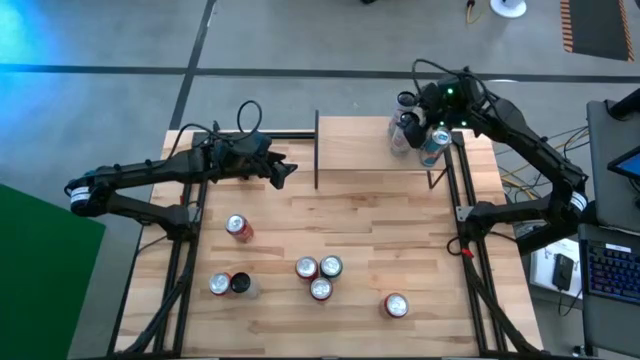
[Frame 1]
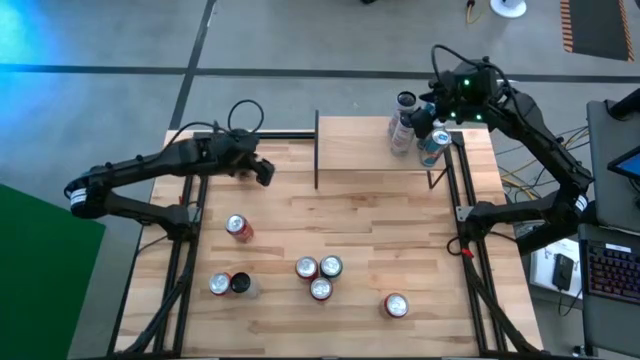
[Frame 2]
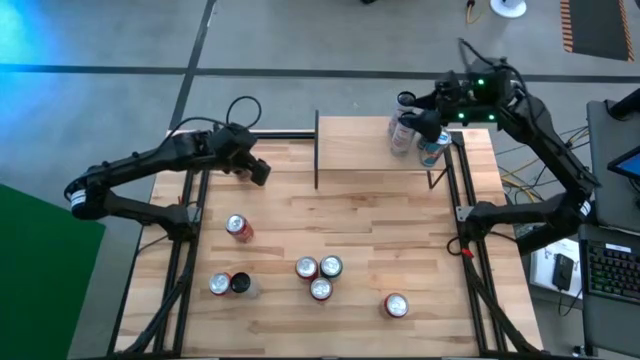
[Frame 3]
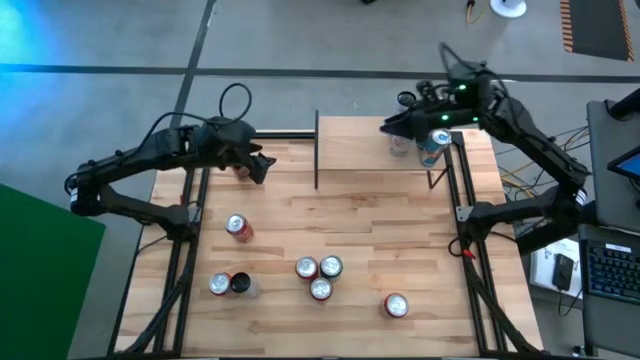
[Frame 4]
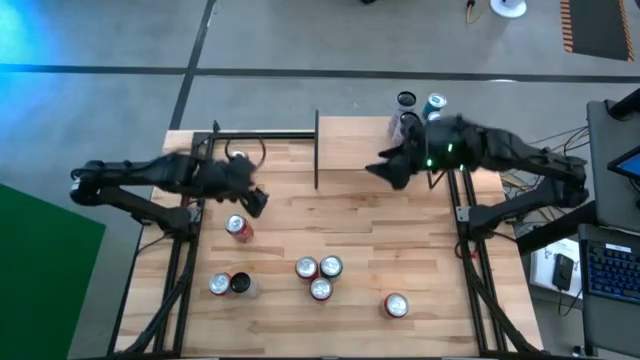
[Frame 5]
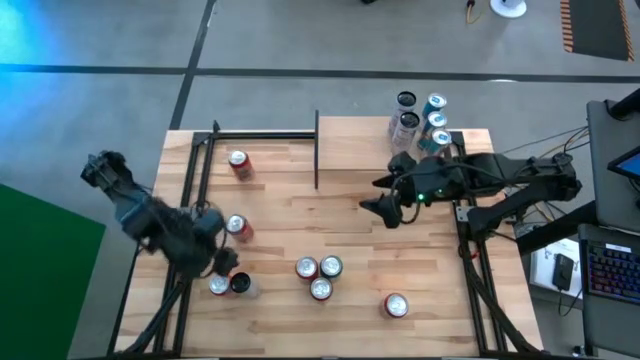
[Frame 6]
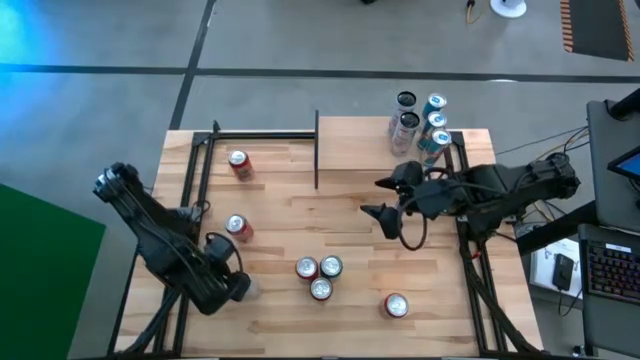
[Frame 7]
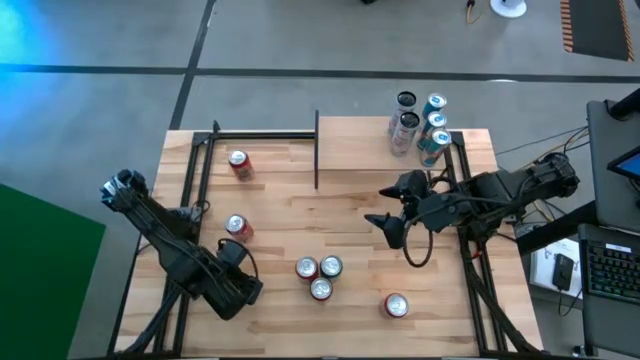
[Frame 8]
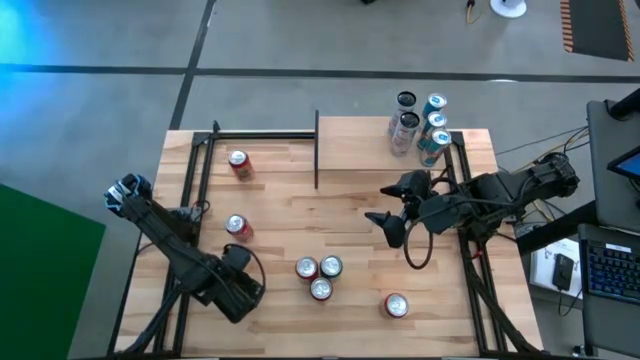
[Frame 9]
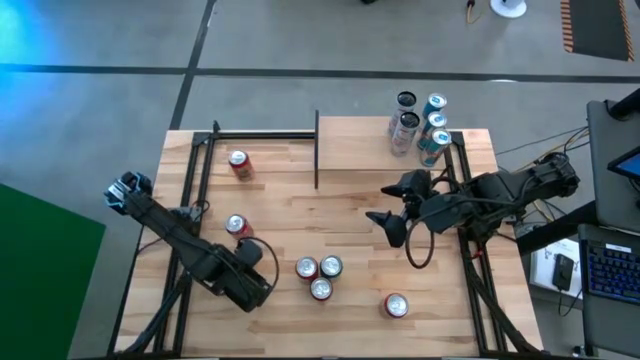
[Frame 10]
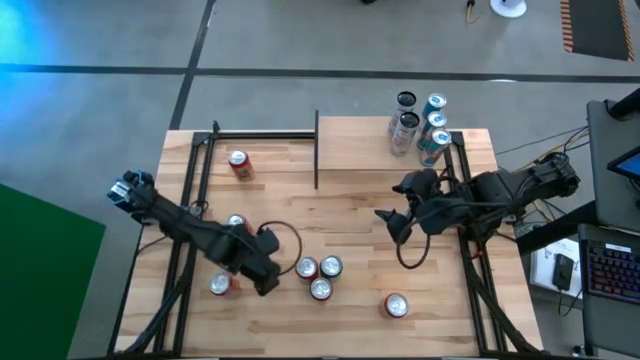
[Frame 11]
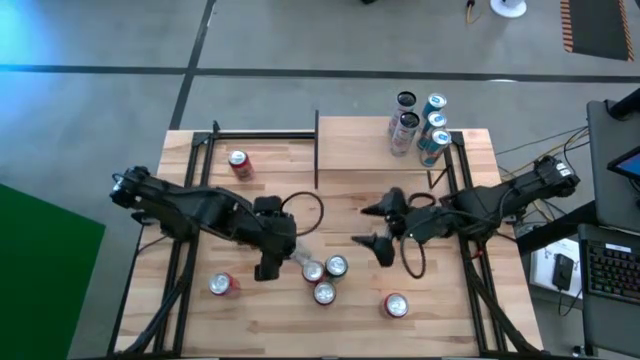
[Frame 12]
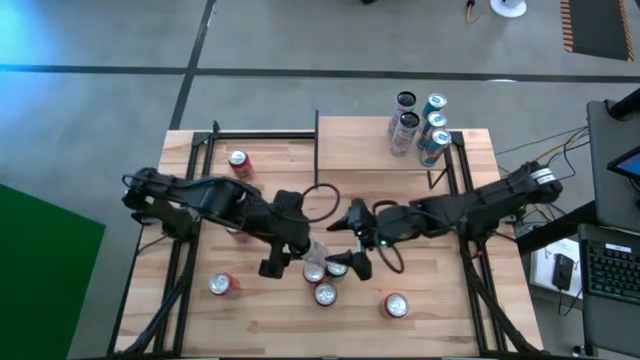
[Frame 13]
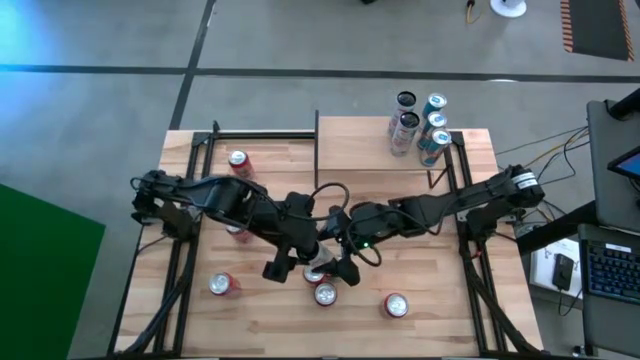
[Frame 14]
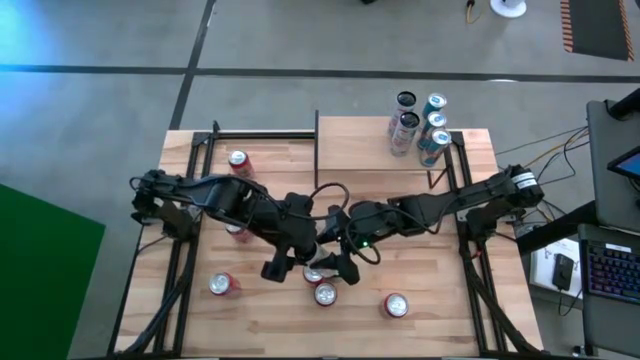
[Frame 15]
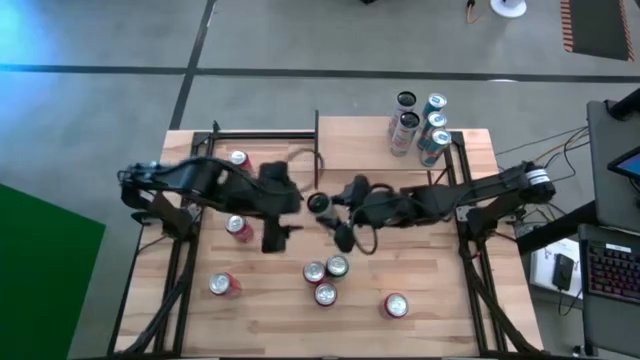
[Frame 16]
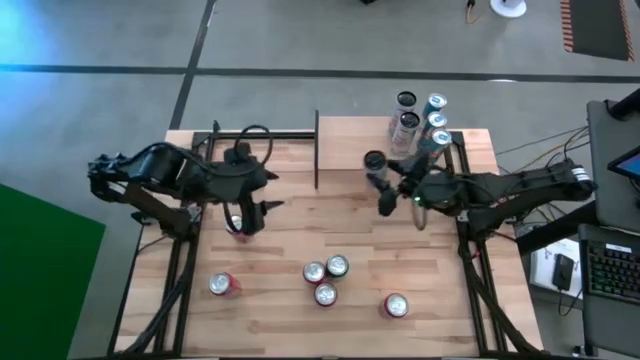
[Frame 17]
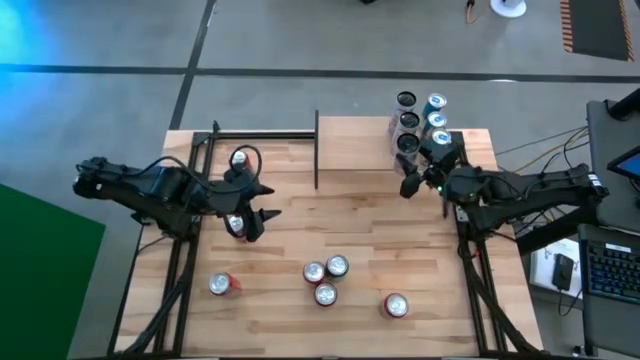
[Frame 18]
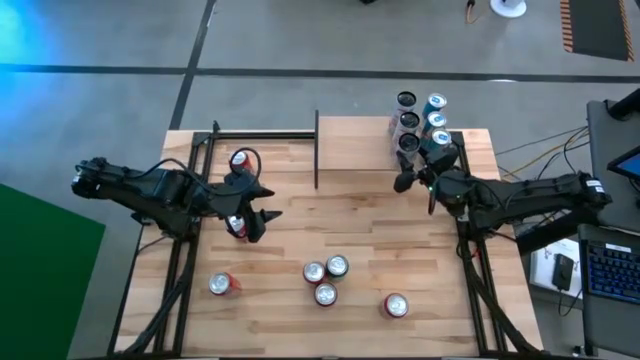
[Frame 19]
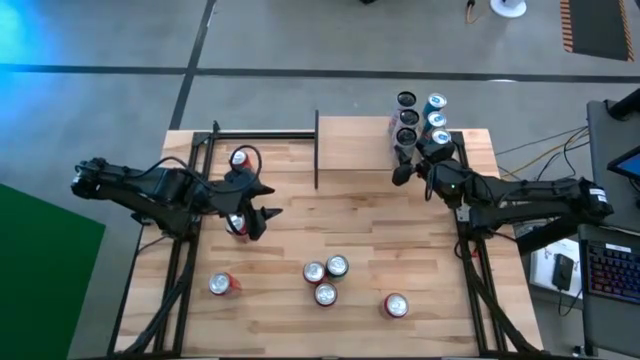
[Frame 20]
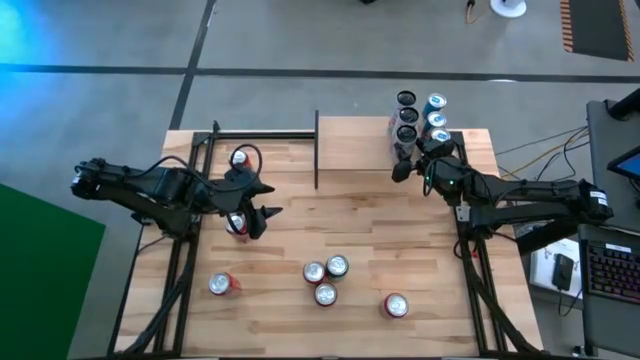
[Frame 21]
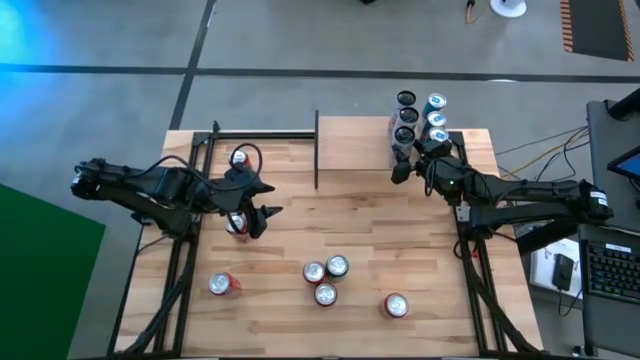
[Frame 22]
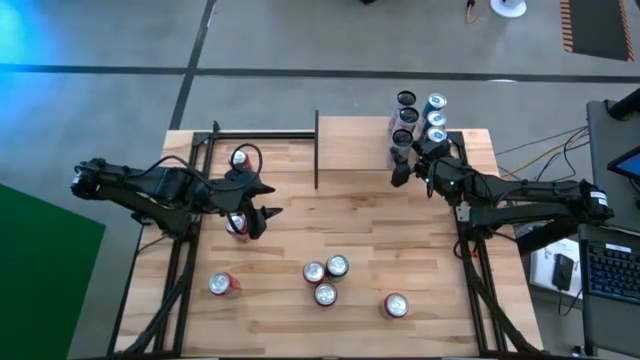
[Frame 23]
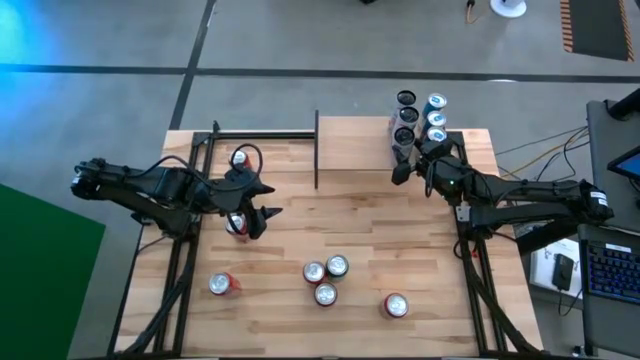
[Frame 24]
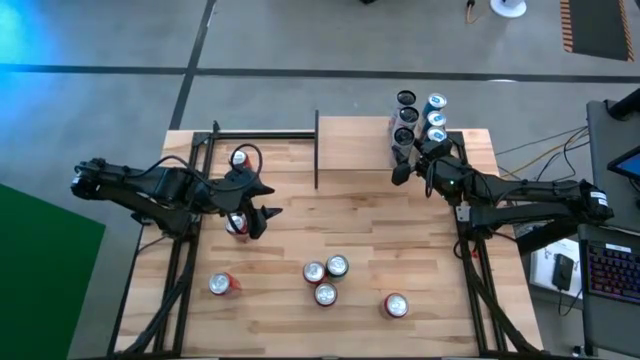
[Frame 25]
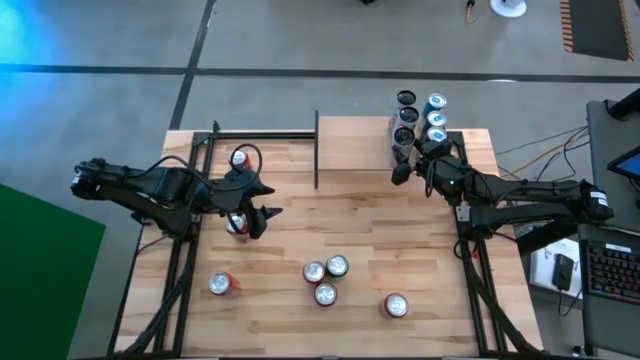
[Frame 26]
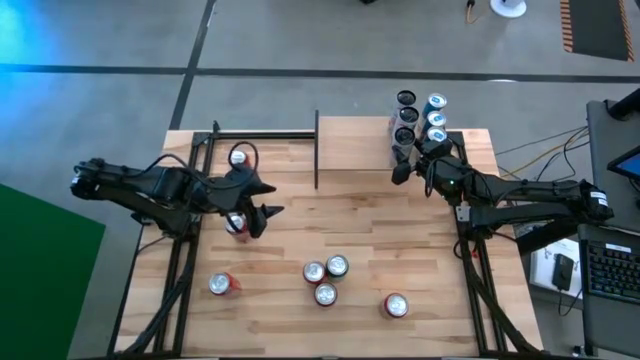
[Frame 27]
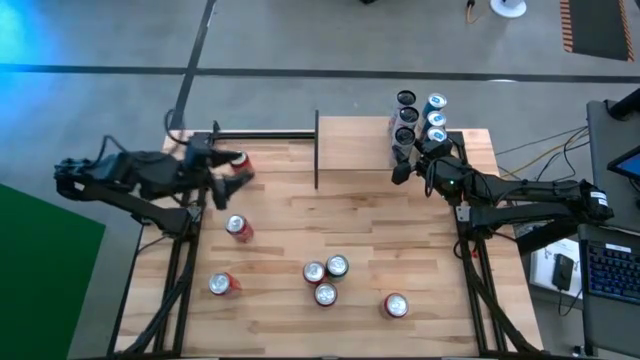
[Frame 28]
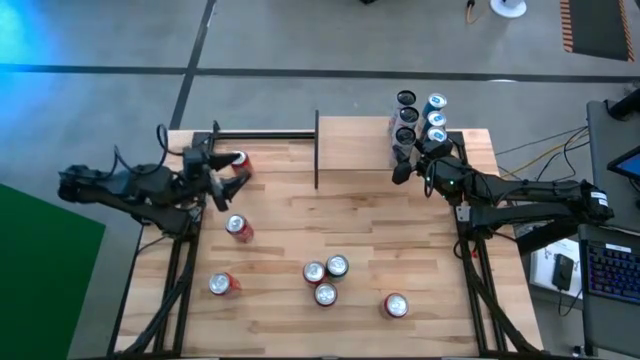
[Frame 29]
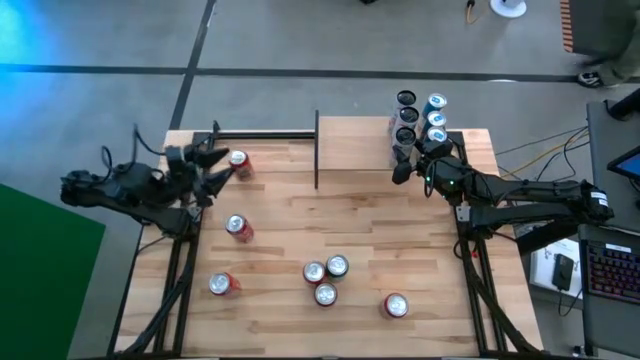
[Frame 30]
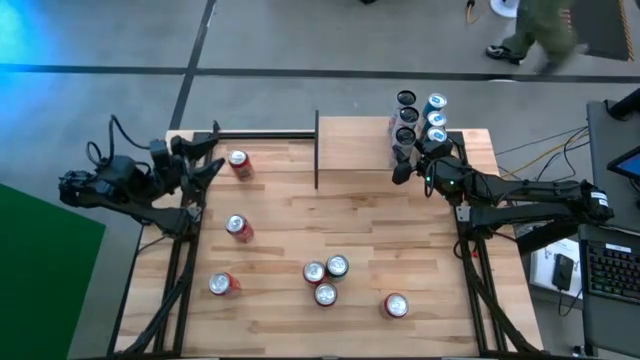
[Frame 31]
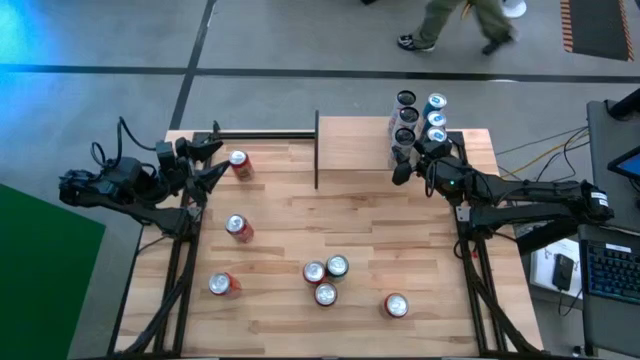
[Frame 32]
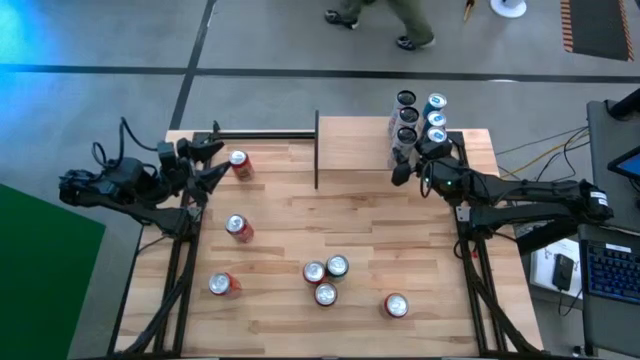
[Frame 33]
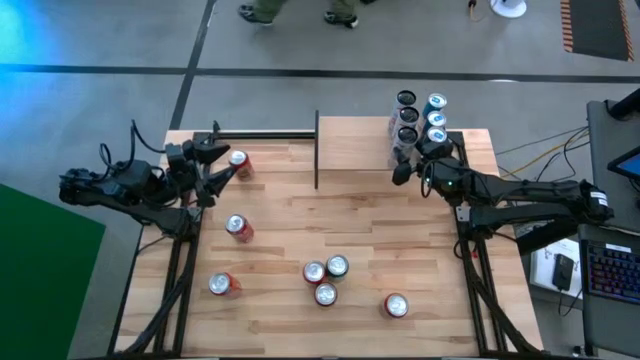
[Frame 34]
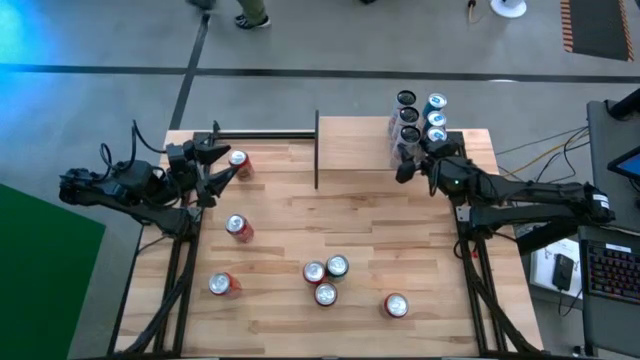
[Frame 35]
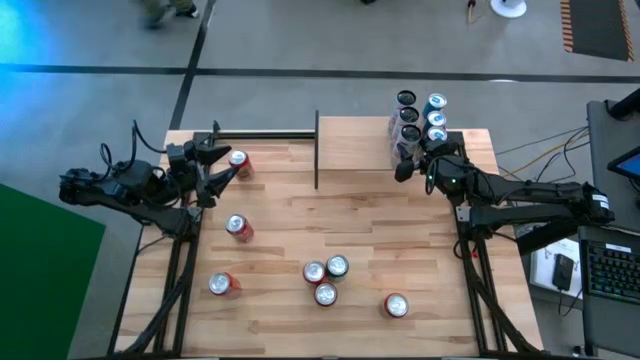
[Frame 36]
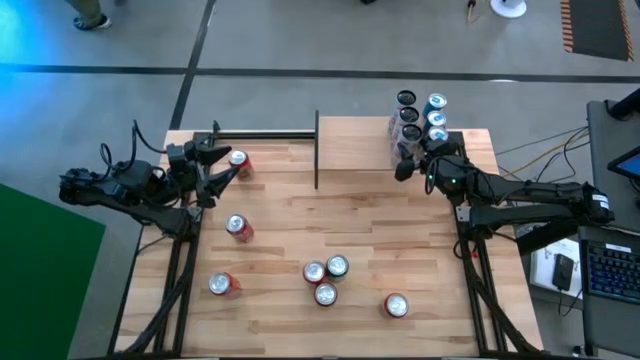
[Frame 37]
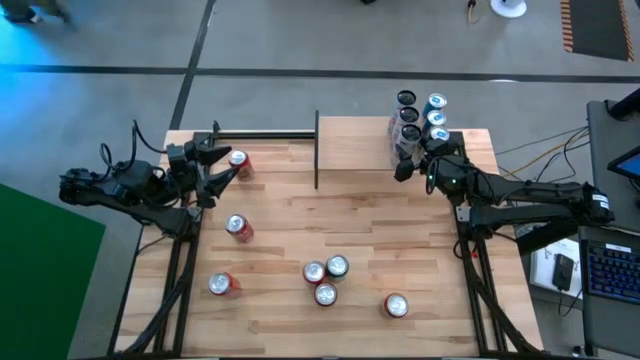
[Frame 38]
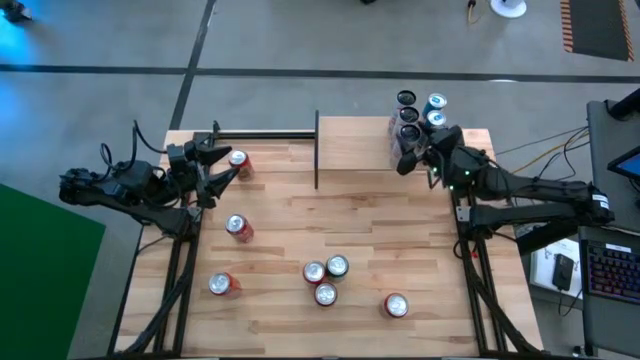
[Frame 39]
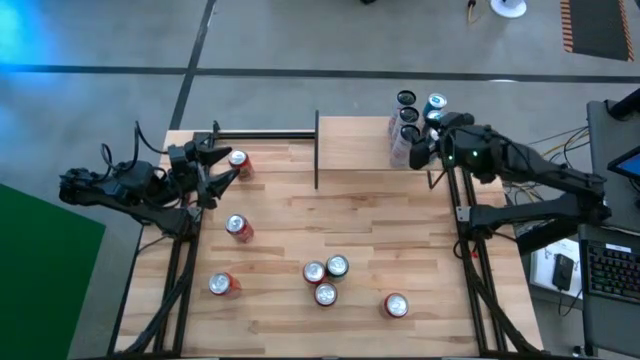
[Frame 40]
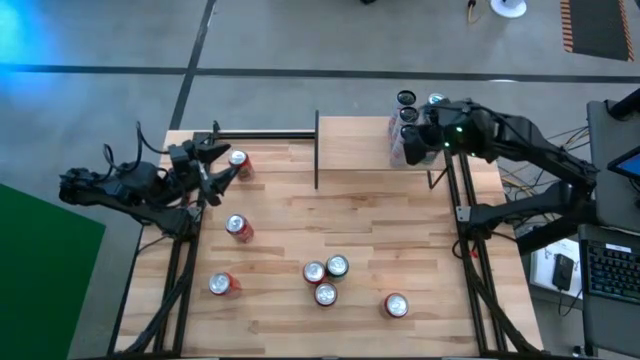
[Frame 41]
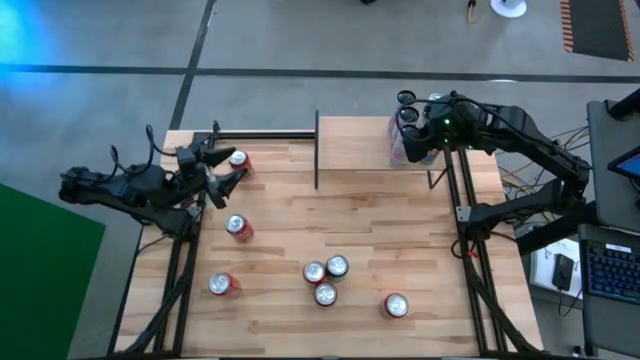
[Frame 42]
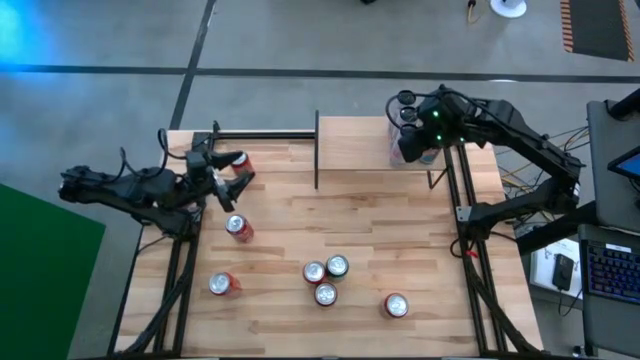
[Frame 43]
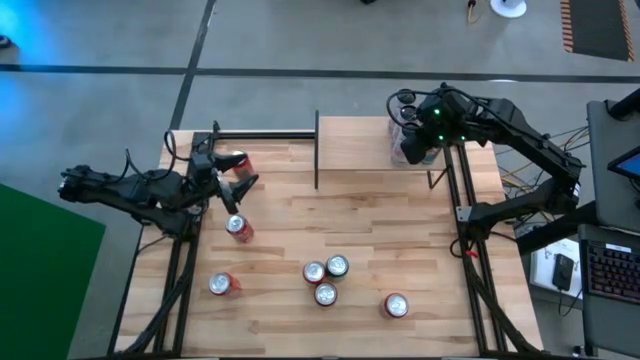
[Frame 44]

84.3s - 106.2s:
Task: Place canned beverage on shelf
Put the white-pink soda can on the shelf aligned with the other white-pink soda cans
